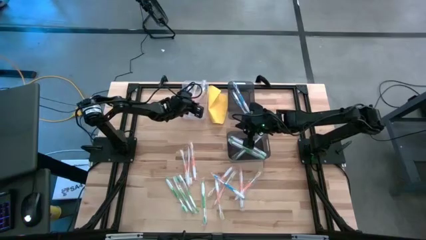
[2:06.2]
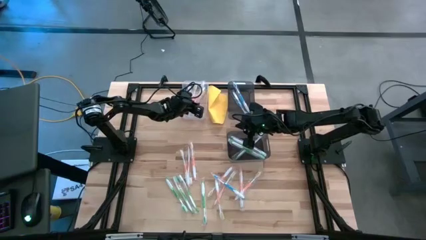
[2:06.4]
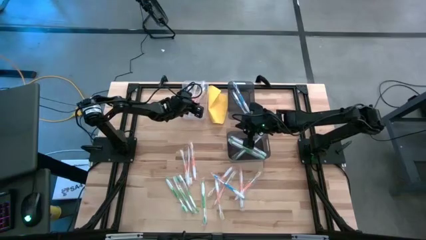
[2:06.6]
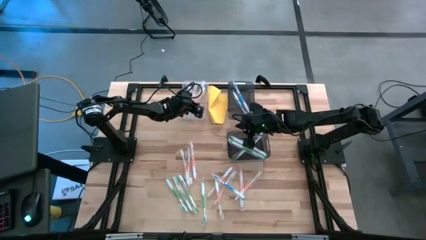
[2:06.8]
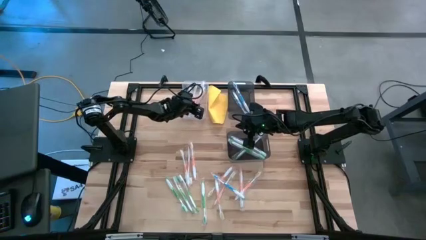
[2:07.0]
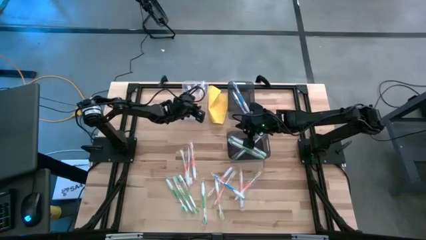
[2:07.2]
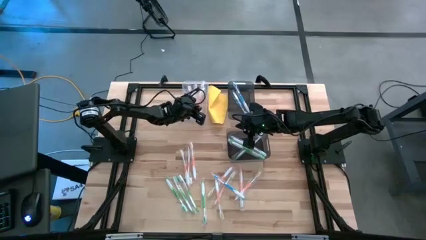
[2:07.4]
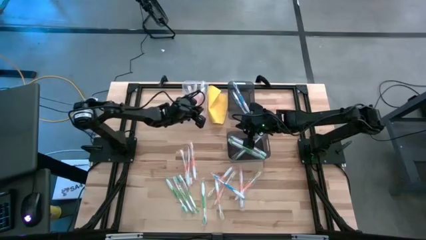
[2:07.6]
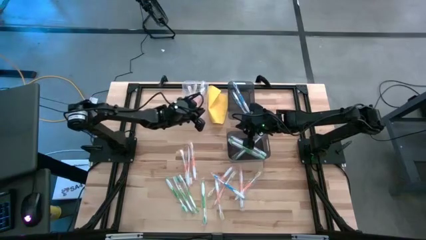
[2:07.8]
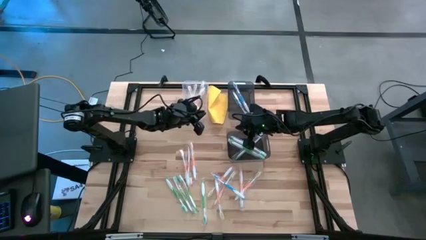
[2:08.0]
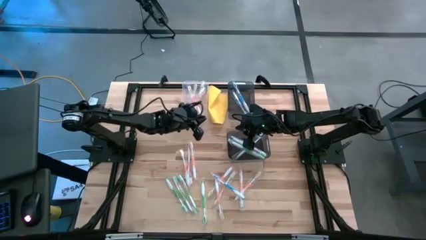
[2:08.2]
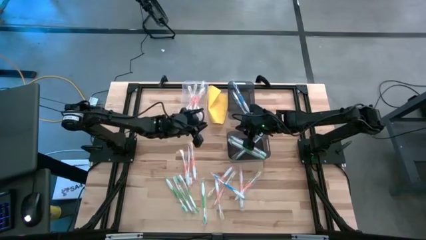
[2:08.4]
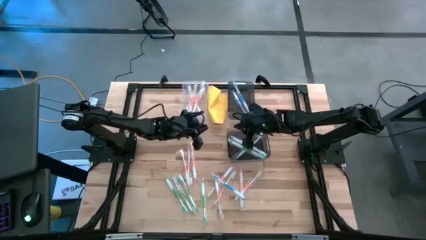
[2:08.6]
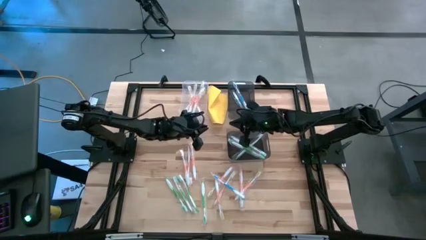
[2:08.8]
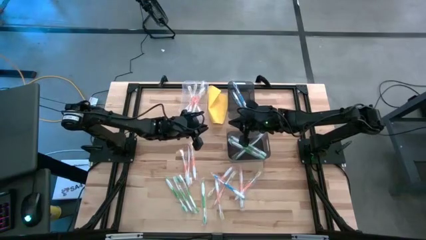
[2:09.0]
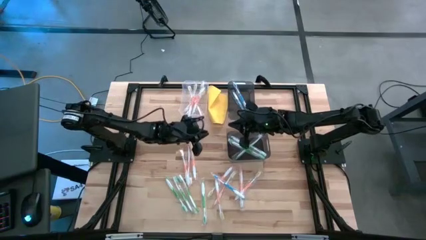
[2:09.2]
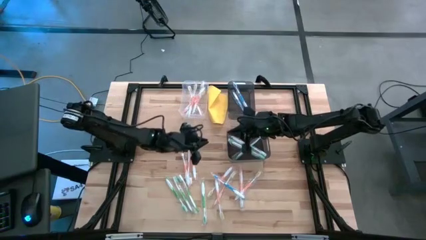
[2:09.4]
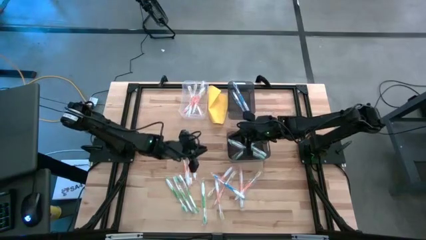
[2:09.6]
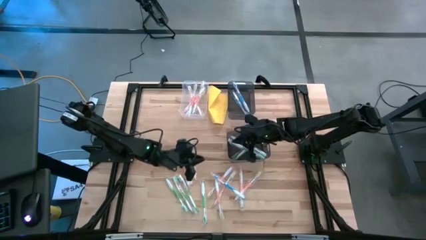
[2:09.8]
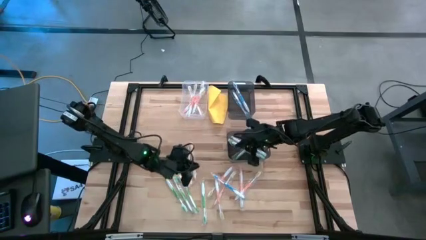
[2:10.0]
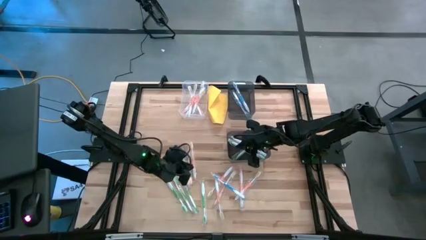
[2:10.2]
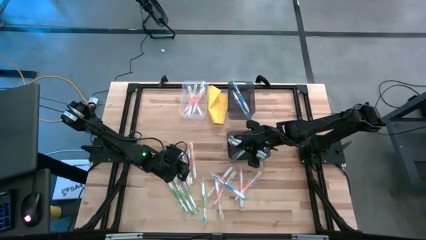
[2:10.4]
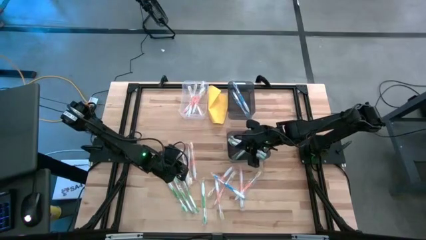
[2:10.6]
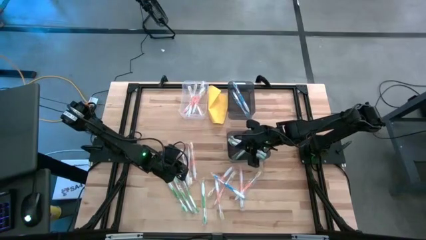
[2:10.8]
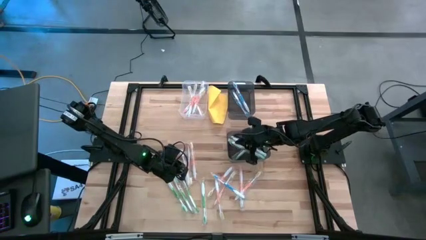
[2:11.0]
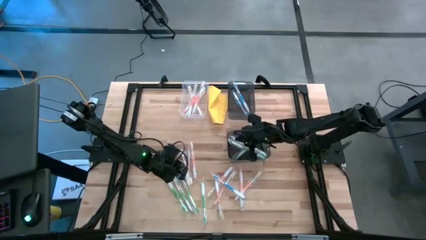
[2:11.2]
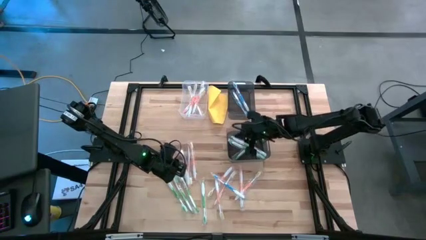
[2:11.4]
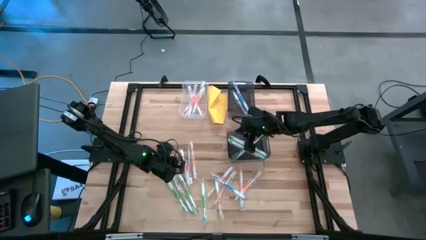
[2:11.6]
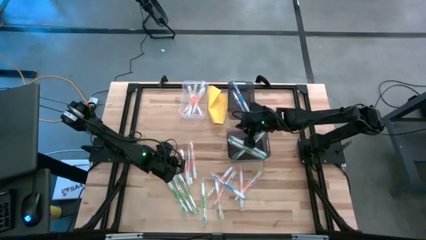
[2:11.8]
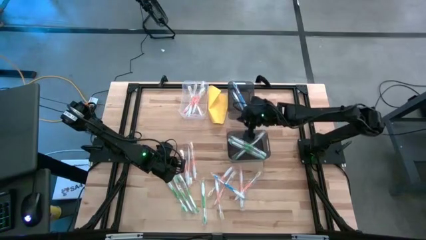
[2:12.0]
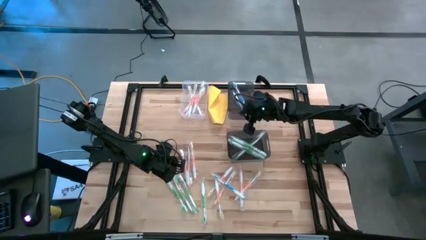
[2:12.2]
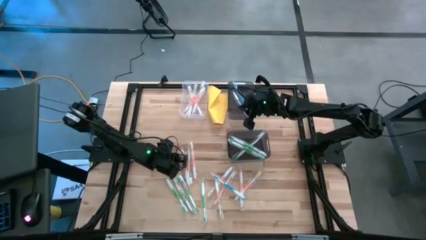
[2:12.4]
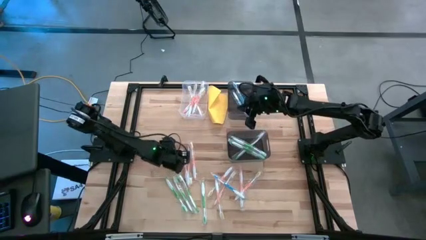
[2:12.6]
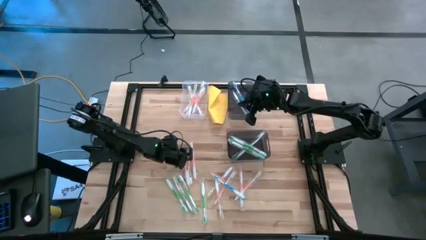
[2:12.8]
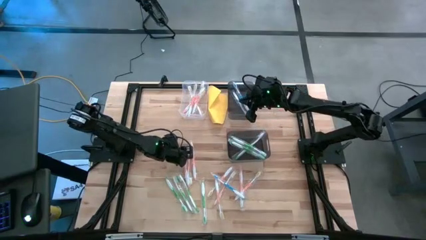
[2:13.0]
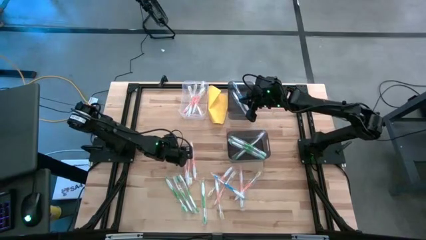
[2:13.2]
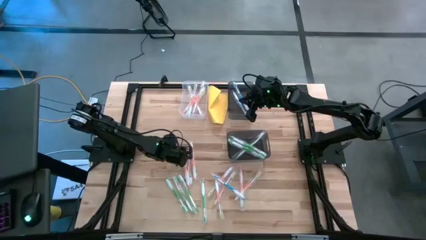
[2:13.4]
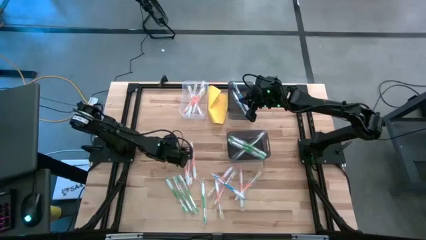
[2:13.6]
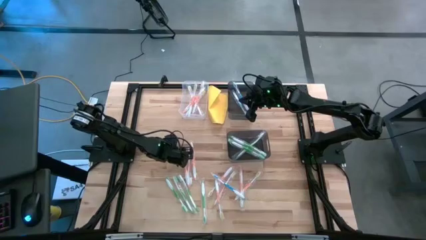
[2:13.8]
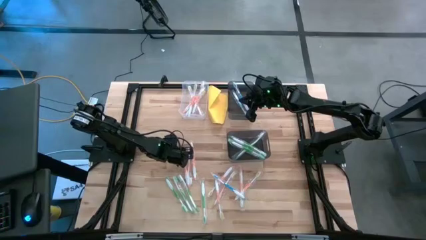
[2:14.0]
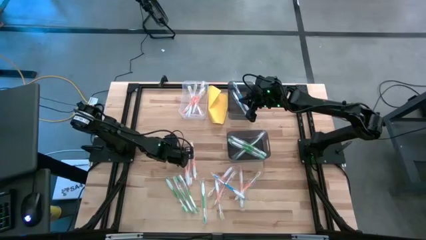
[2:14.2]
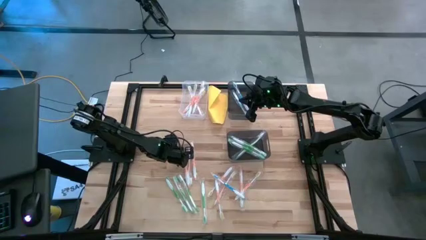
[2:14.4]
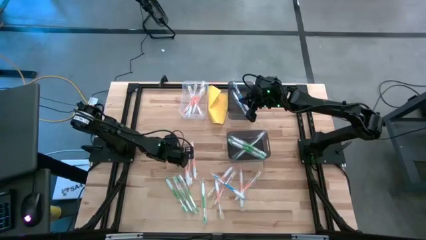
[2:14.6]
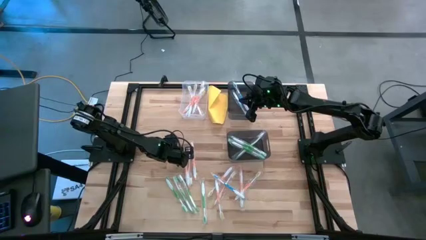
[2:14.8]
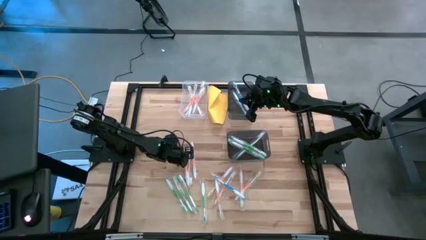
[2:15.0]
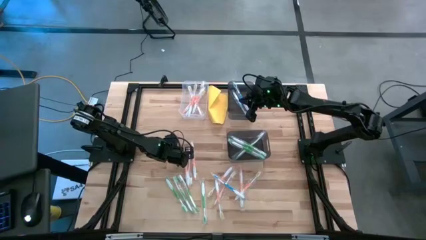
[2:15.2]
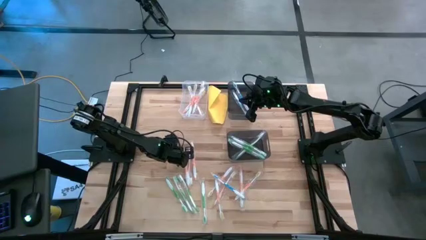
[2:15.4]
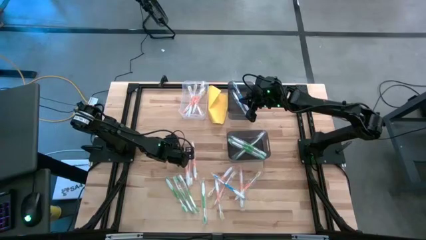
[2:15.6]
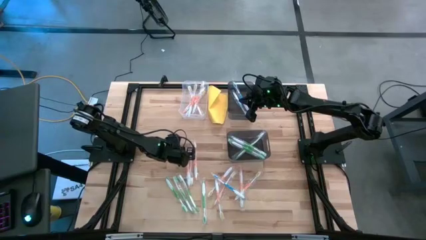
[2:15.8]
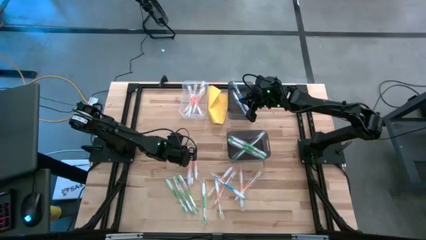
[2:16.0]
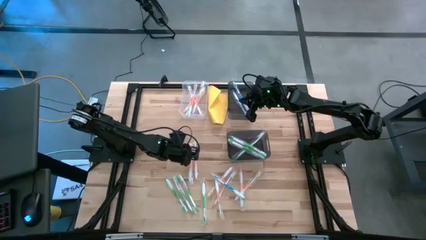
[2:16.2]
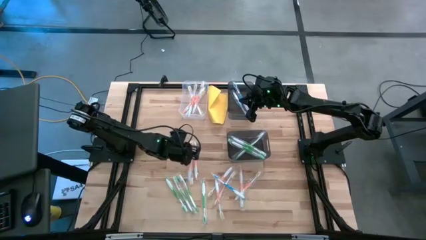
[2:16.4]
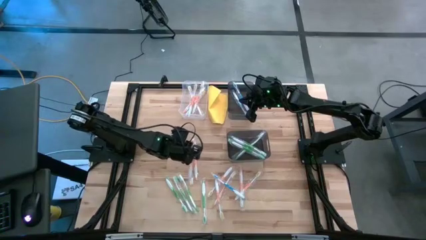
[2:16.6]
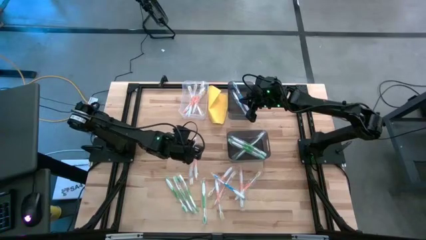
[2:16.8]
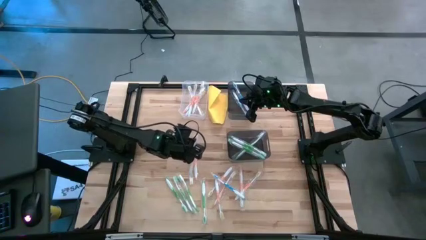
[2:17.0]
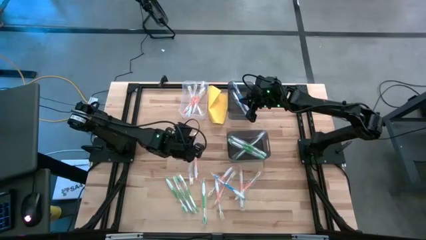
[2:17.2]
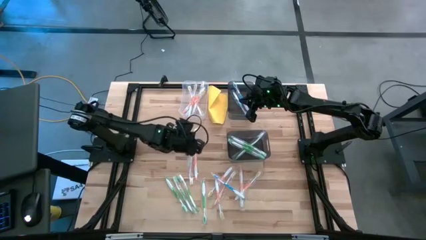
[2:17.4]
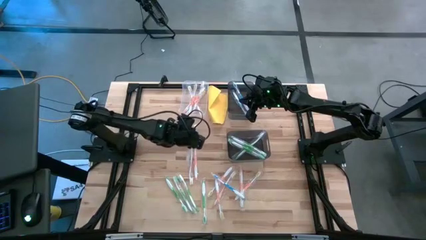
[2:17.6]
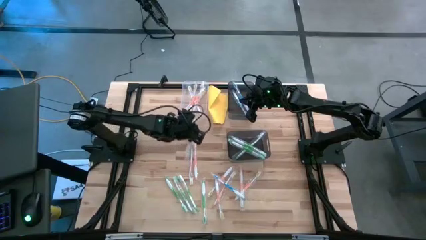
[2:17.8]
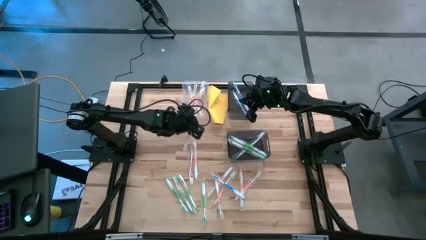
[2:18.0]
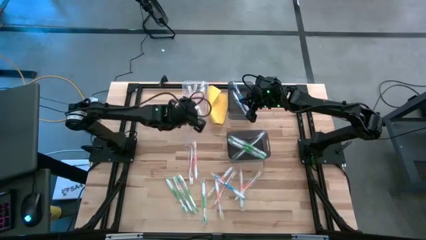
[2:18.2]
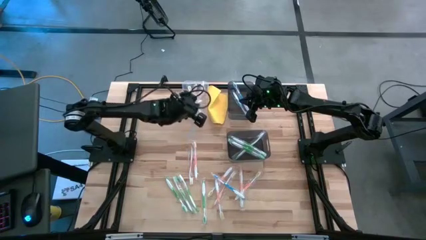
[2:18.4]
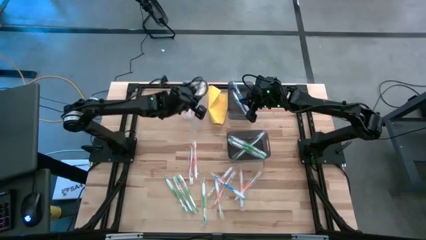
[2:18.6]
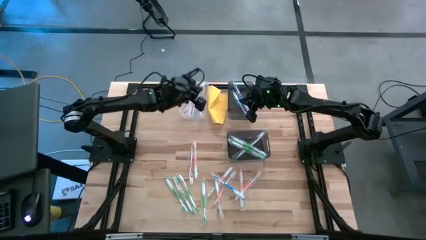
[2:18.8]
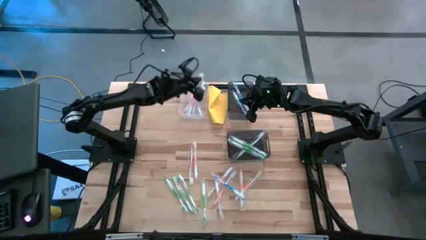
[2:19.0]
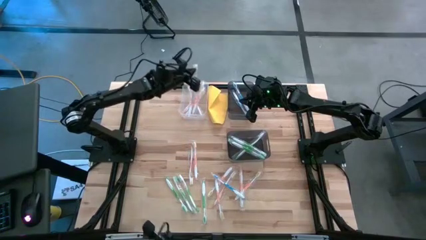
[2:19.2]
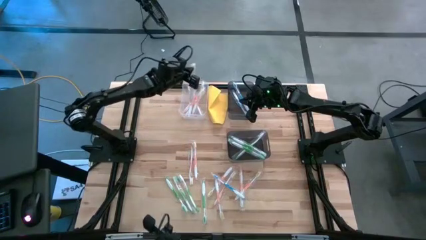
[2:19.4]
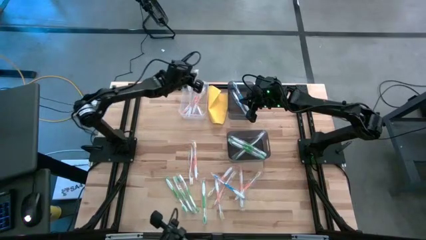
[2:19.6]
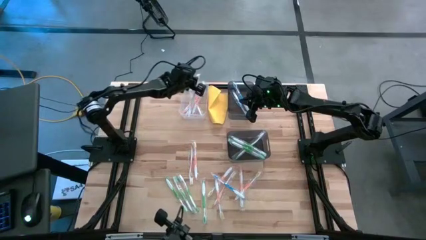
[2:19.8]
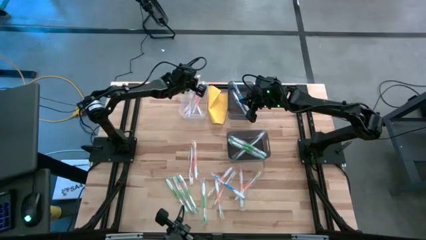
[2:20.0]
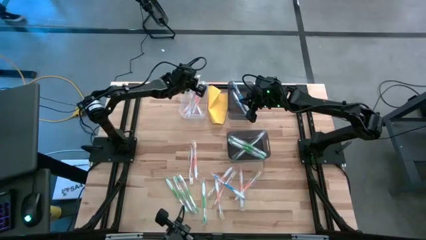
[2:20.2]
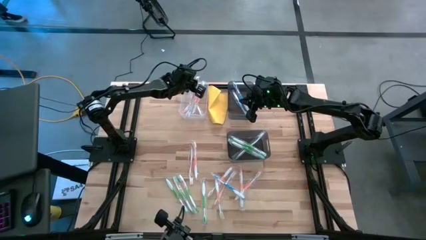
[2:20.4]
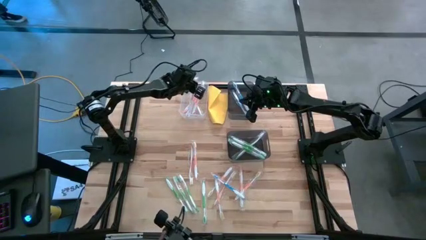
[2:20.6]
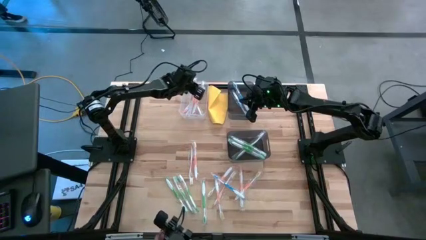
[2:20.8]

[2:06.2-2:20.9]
Task: Pick & Place Toothbrushes
Put the orange toothbrush into the transparent bin

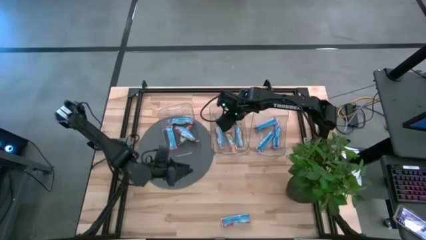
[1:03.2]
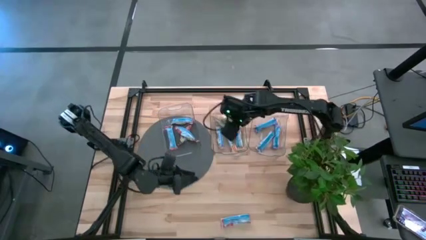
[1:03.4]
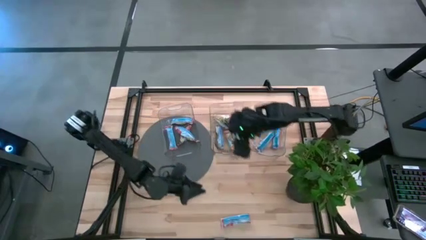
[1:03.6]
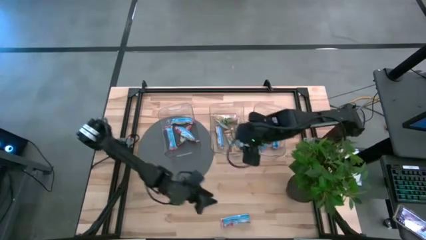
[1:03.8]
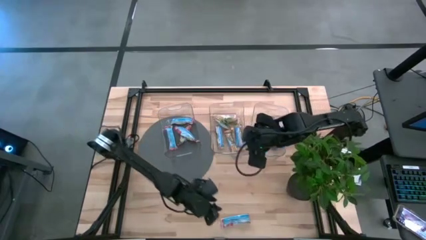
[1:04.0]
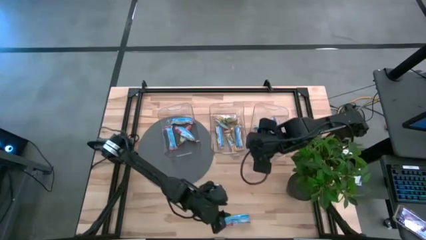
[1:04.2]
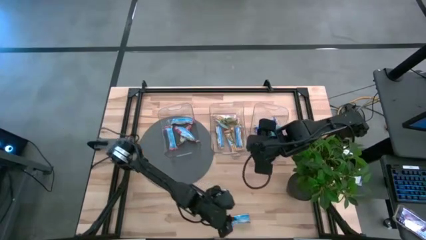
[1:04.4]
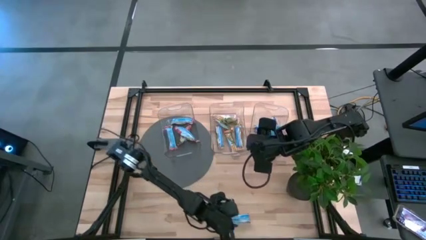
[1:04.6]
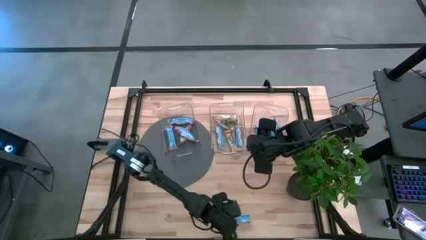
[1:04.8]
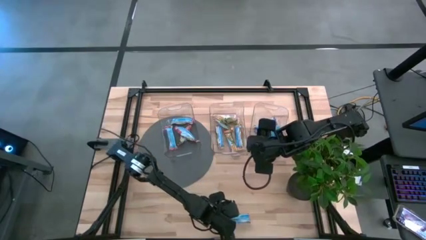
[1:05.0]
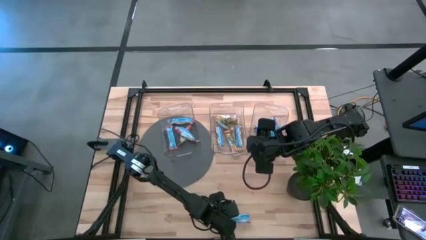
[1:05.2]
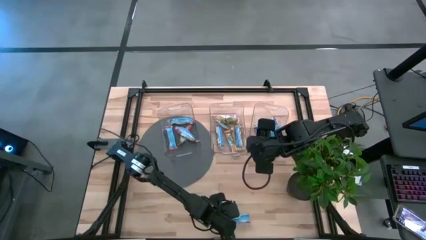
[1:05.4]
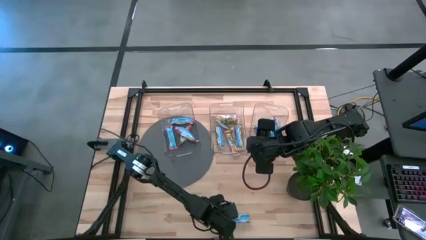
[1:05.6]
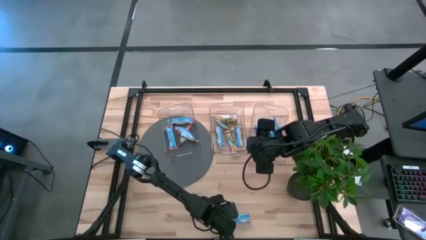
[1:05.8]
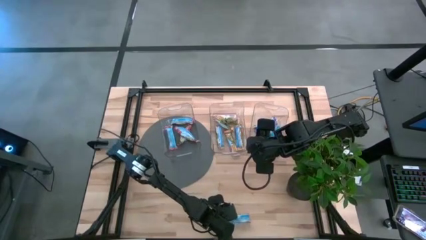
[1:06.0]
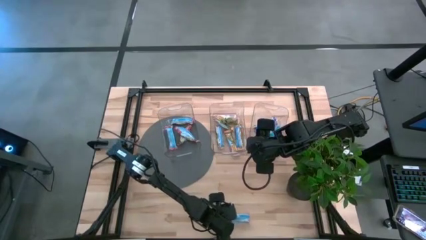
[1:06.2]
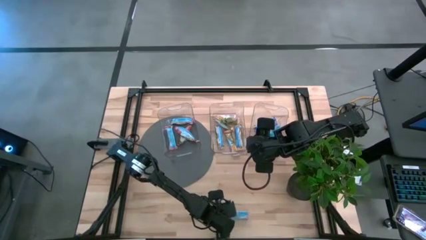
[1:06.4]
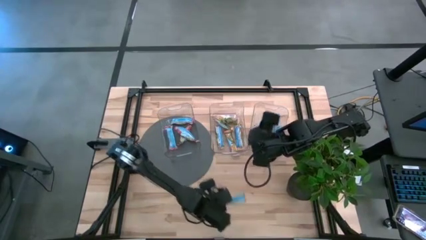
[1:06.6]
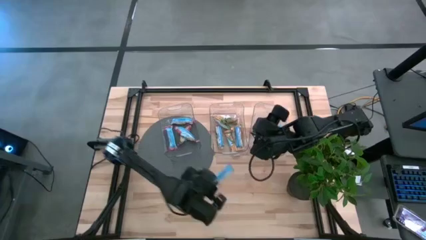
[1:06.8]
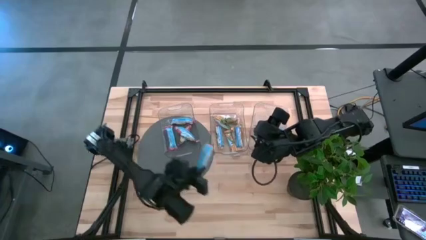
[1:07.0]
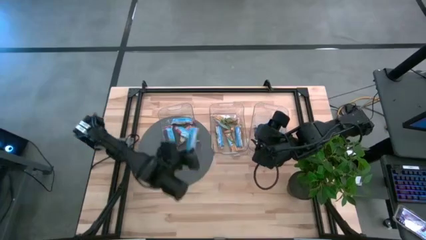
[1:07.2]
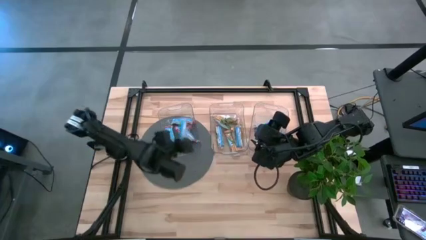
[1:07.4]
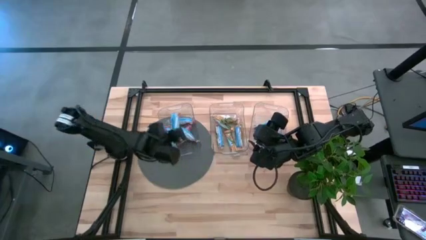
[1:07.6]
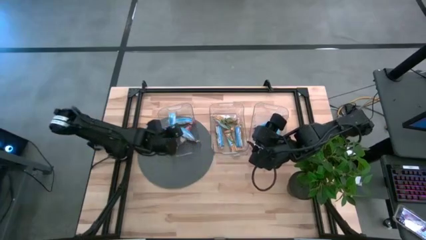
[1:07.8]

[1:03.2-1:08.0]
Task: Pick and place Granola Bars by type
Put the red granola bar into the left transparent bin
